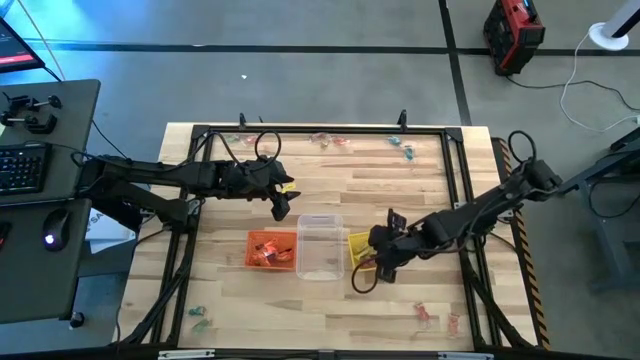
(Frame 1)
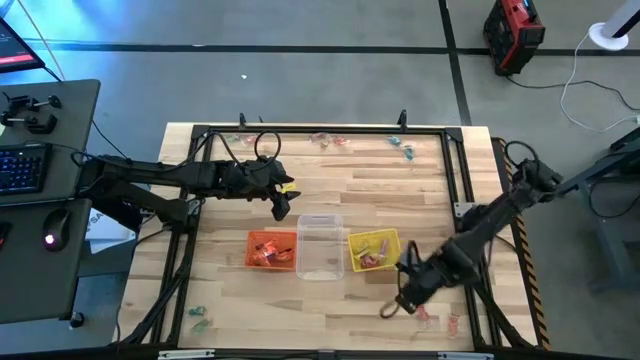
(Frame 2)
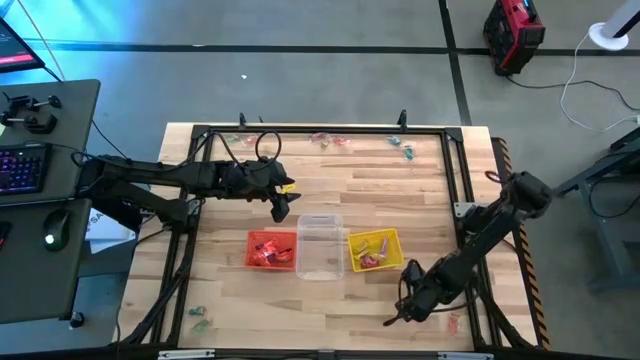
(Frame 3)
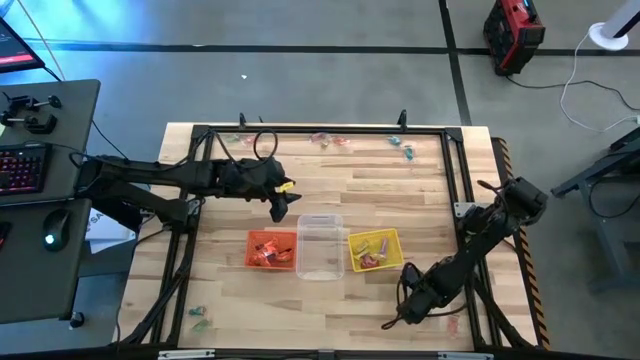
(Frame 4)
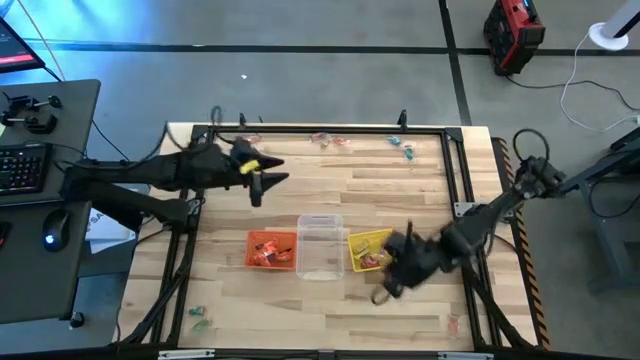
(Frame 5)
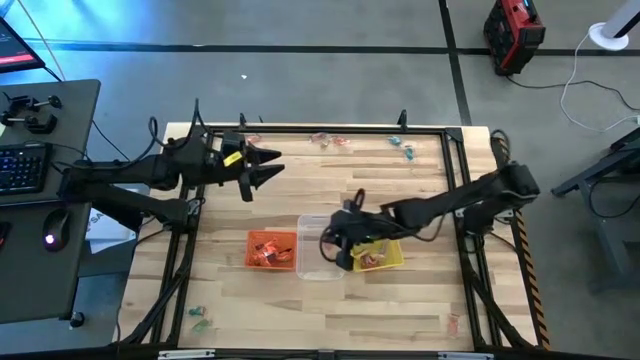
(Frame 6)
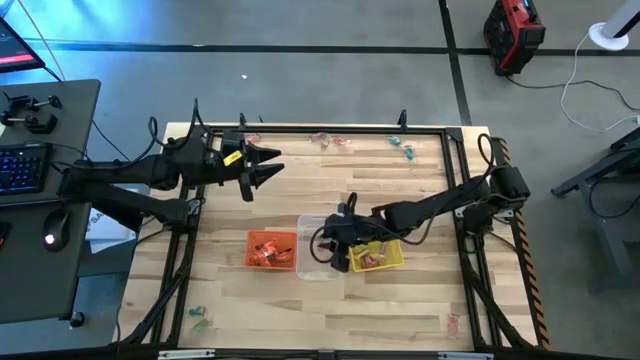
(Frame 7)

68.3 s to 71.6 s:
Task: Sort candy by brand, put in halloween buckets
Put the red gummy into the transparent bin

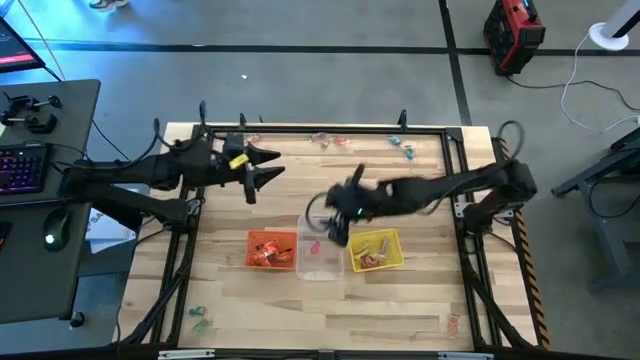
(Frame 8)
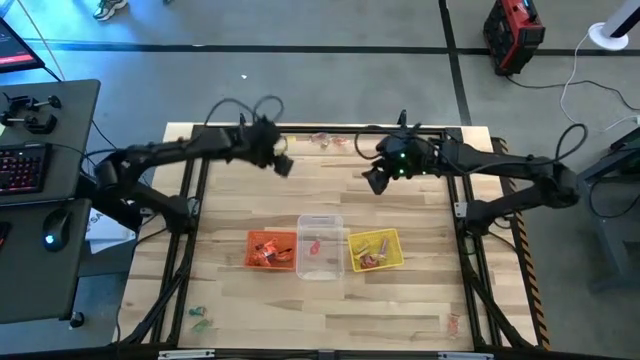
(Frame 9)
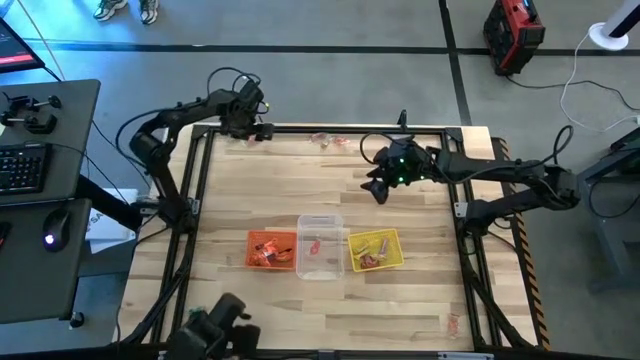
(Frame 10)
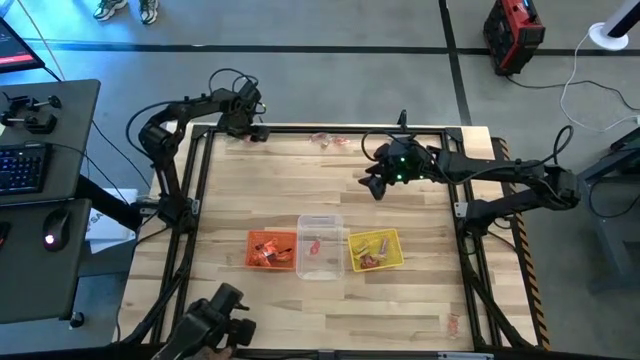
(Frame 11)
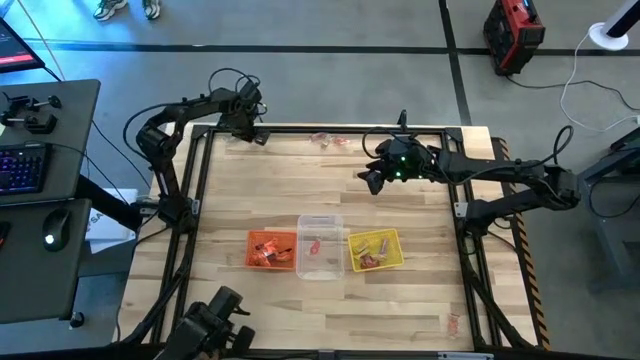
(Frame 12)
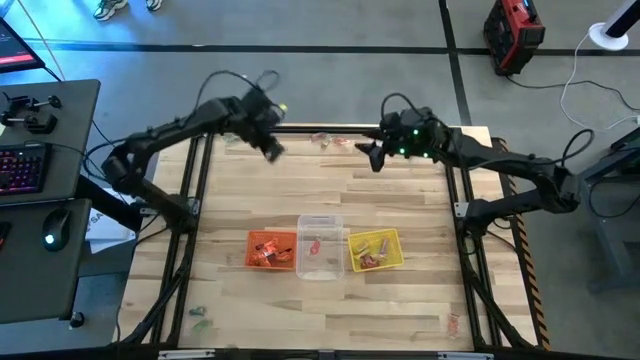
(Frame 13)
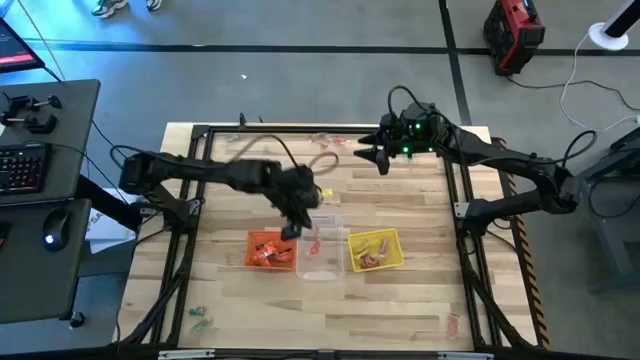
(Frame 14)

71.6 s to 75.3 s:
Put the orange gummy into the transparent bin

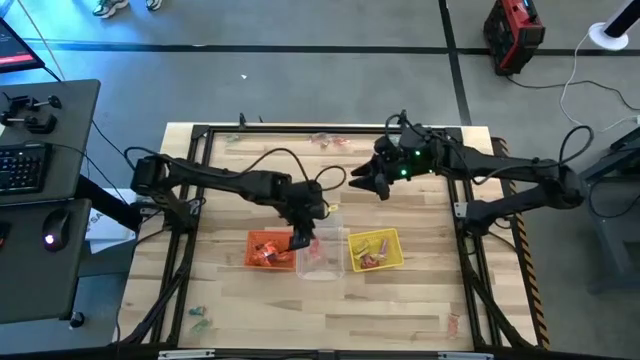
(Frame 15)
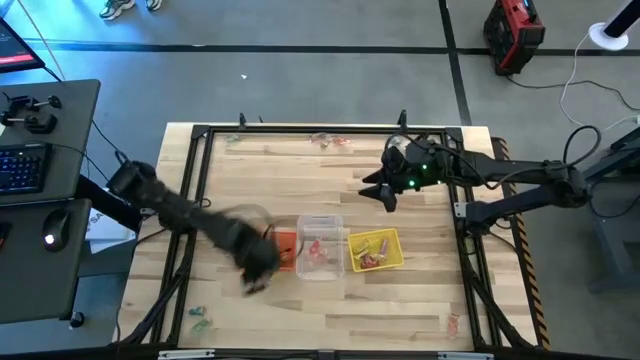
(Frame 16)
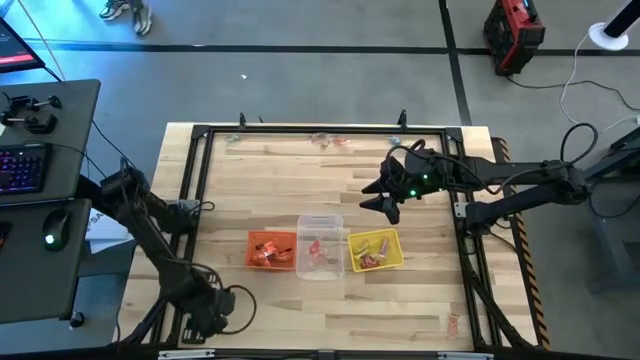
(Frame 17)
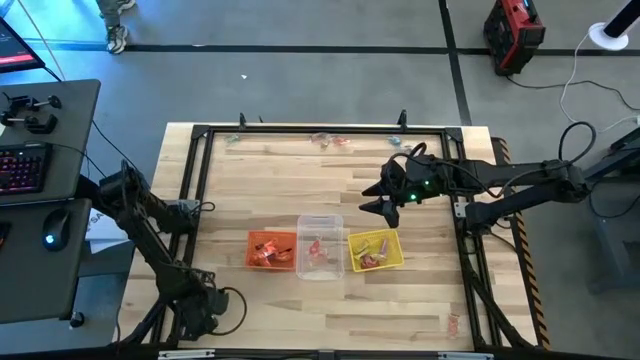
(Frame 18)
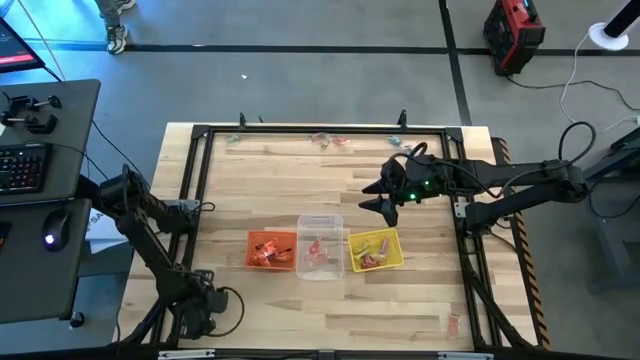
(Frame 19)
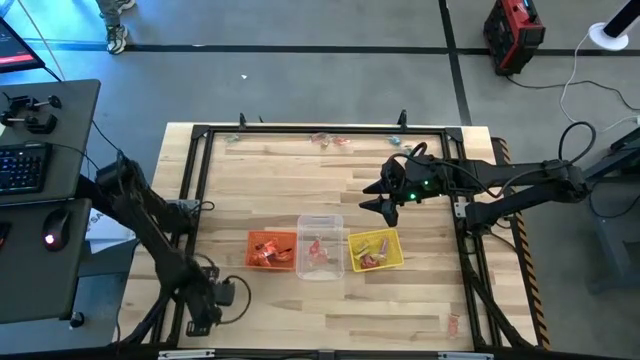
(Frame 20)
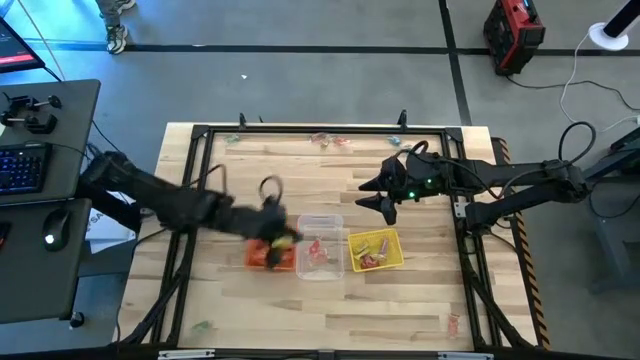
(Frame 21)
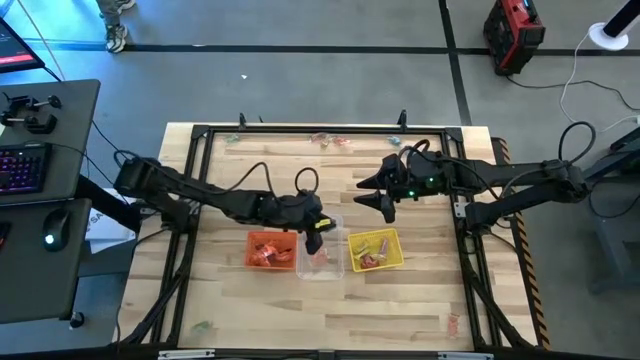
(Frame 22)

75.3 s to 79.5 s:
Put the blue gummy into the transparent bin

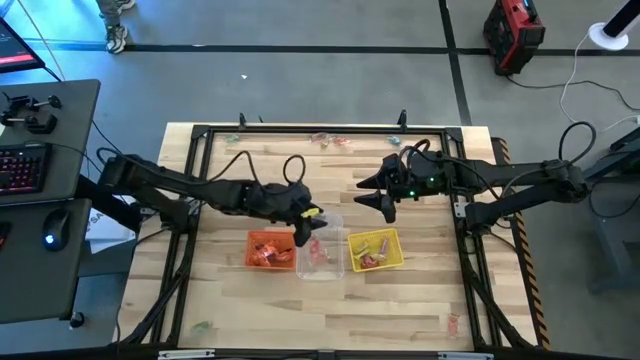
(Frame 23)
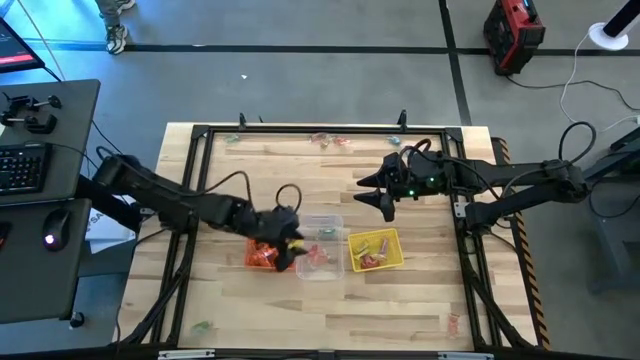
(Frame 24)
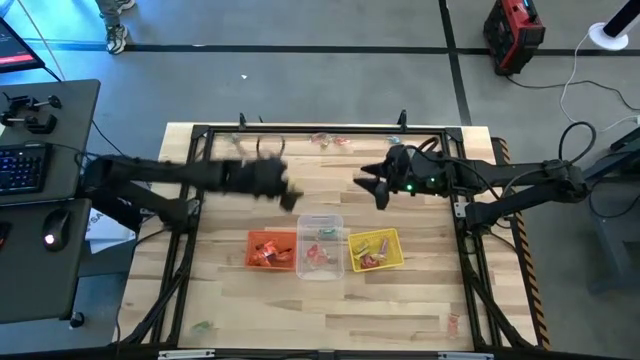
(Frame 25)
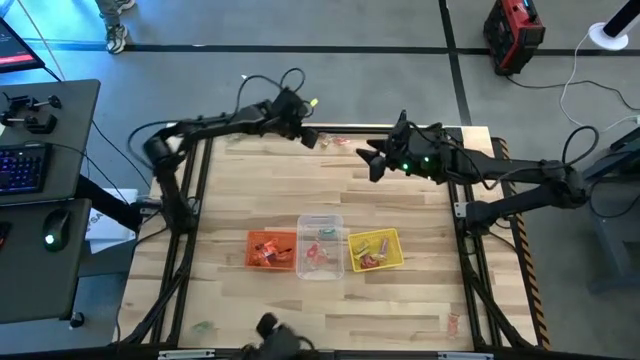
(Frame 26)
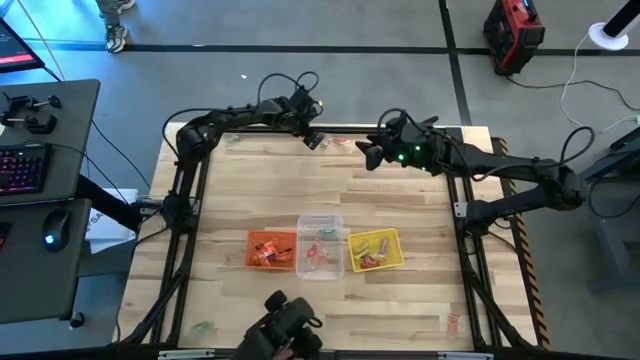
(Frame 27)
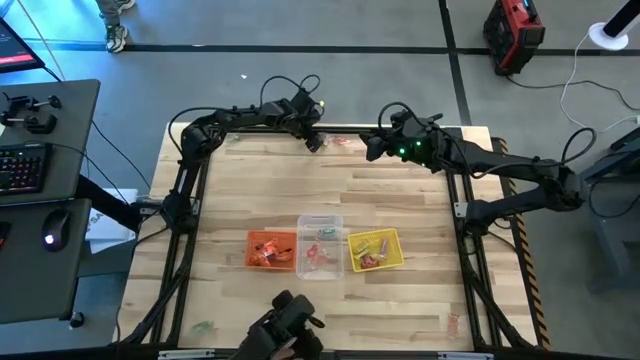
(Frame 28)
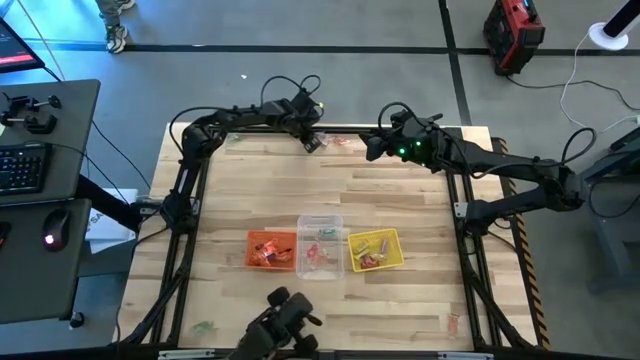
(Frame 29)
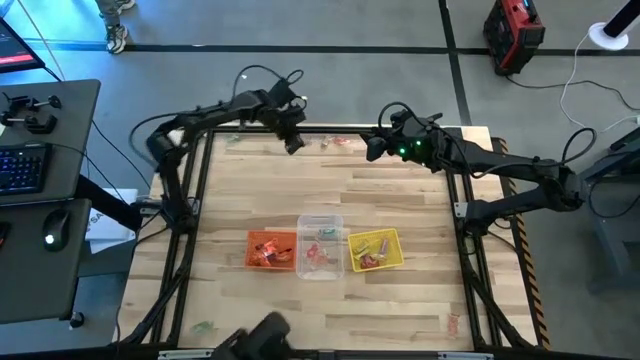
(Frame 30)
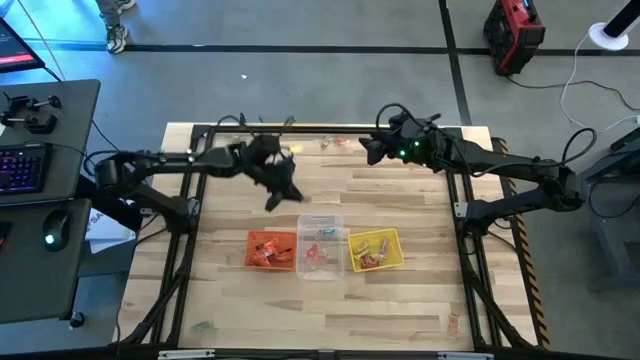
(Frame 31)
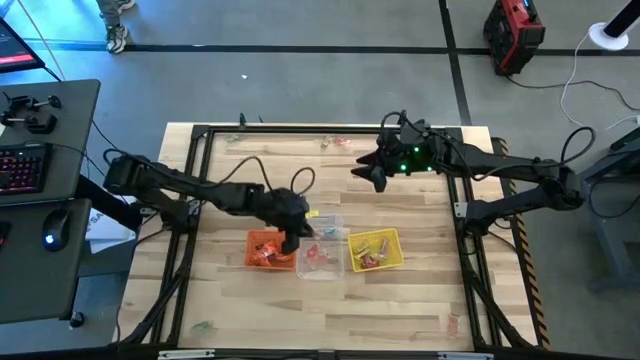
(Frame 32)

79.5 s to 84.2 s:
Put the orange gummy into the transparent bin

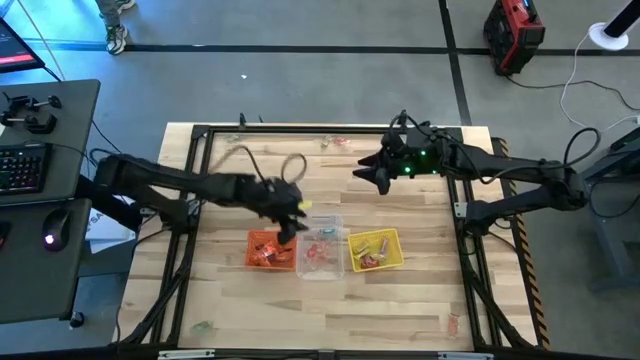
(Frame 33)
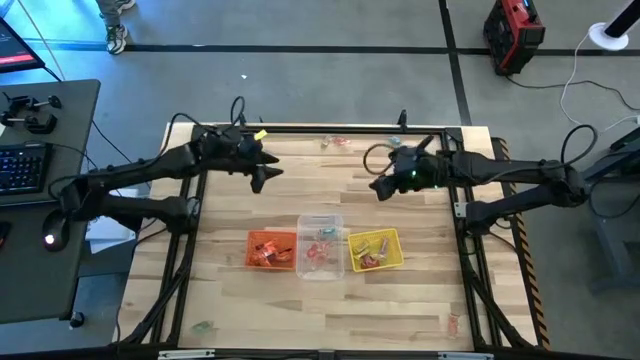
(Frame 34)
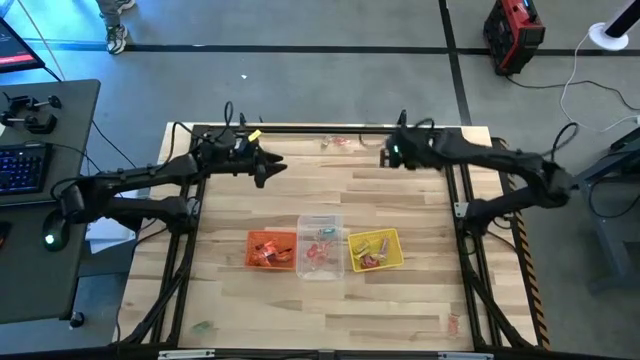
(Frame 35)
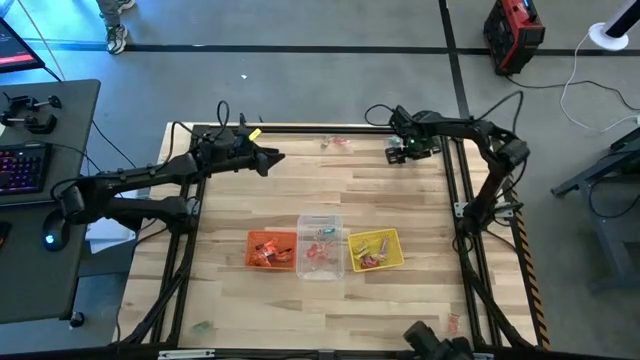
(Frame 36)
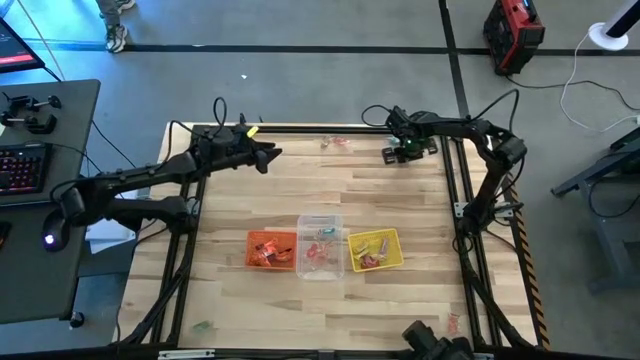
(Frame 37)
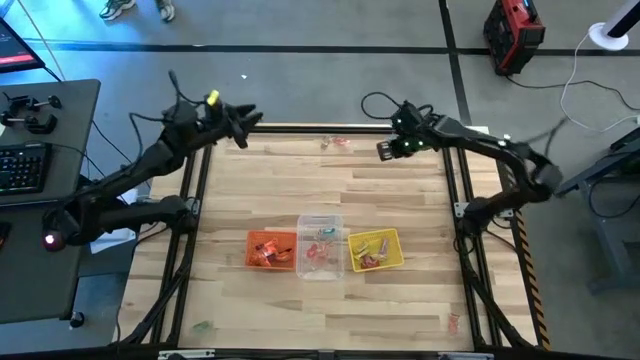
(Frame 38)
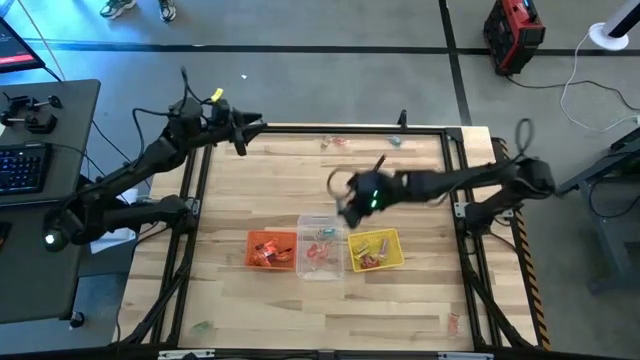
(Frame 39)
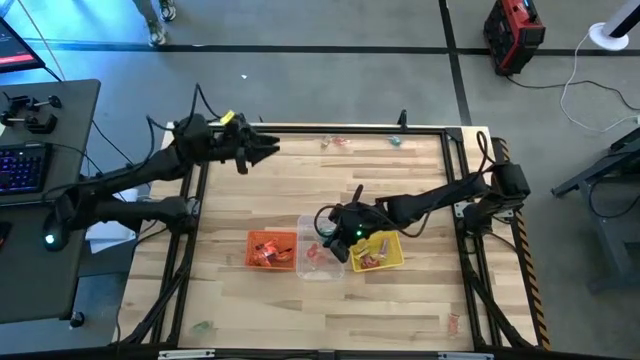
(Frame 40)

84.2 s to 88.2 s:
Put the blue gummy into the transparent bin
